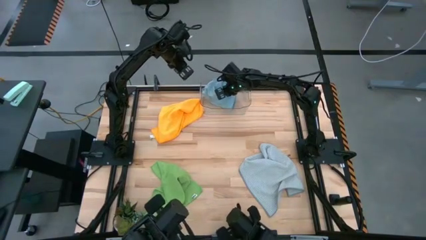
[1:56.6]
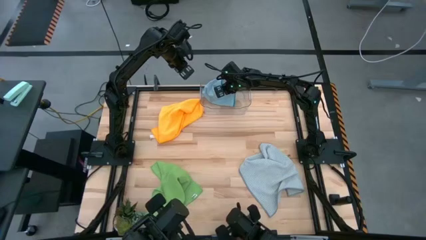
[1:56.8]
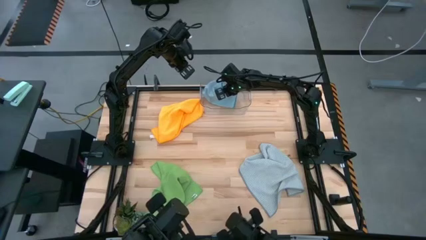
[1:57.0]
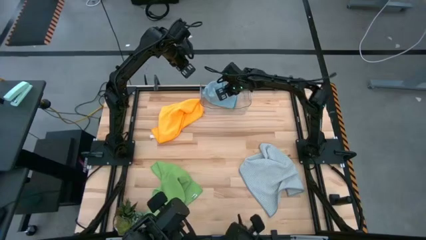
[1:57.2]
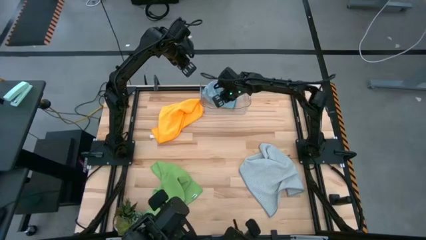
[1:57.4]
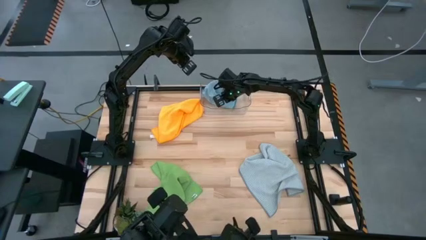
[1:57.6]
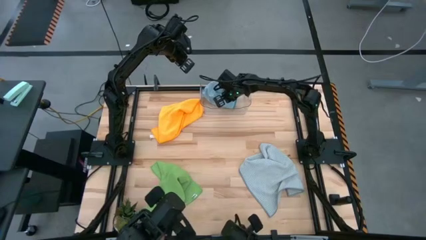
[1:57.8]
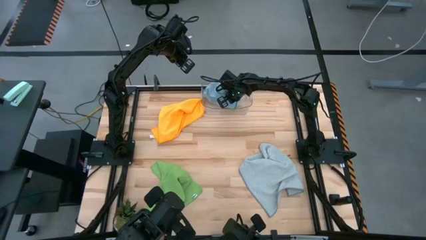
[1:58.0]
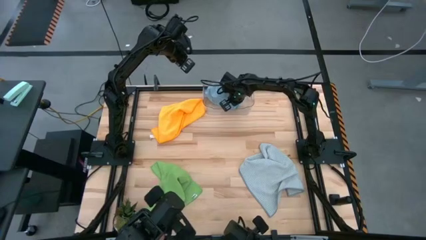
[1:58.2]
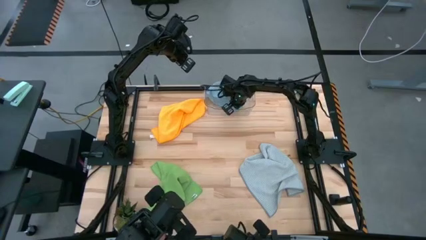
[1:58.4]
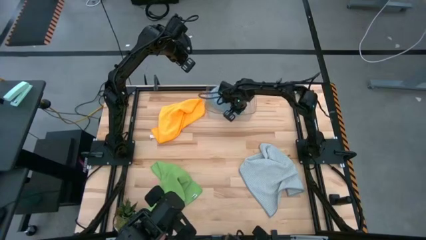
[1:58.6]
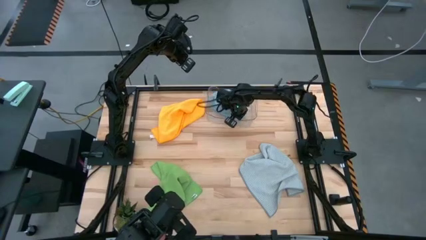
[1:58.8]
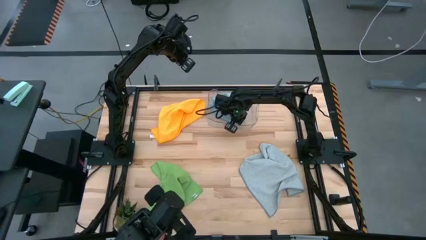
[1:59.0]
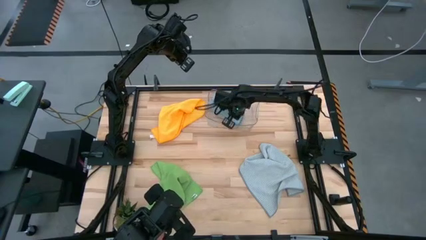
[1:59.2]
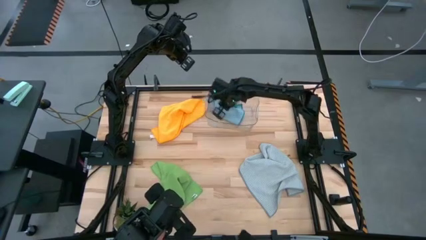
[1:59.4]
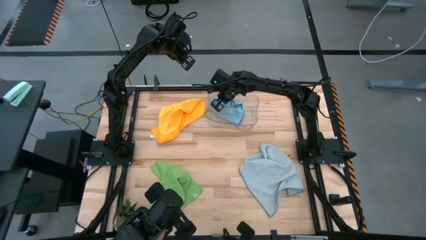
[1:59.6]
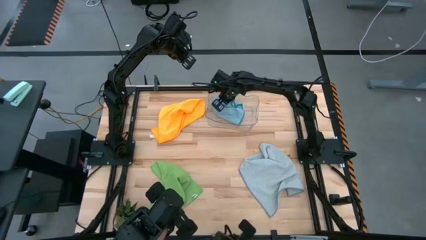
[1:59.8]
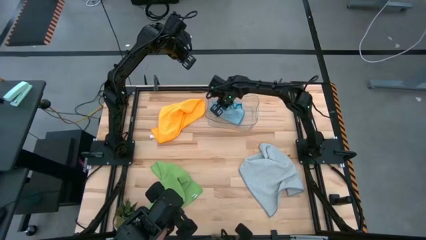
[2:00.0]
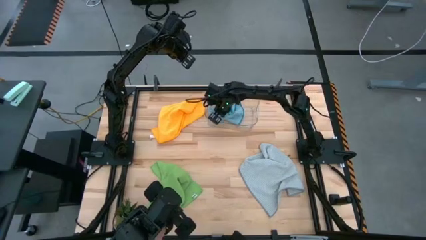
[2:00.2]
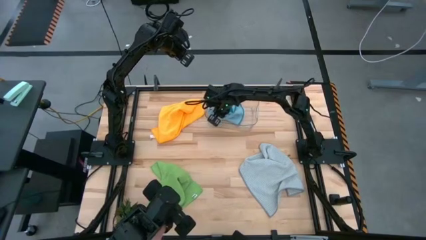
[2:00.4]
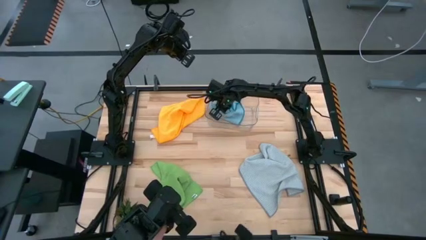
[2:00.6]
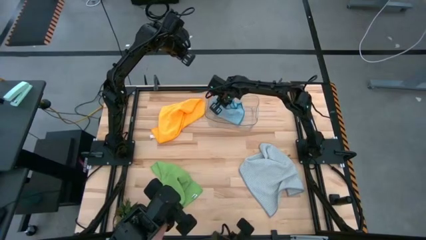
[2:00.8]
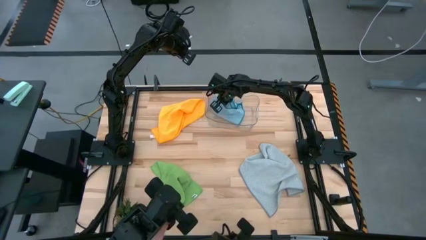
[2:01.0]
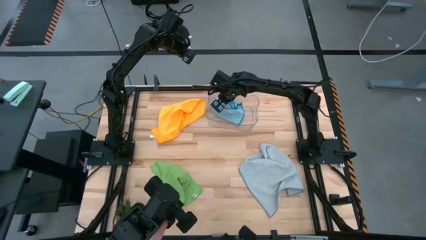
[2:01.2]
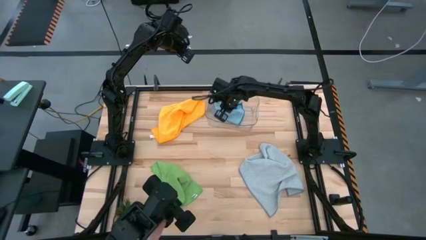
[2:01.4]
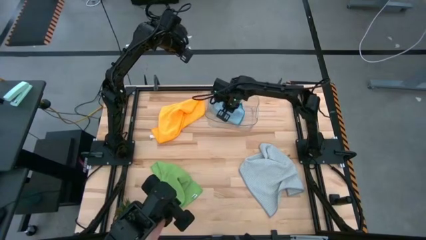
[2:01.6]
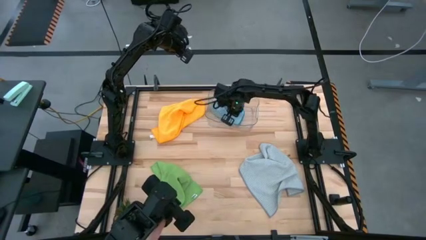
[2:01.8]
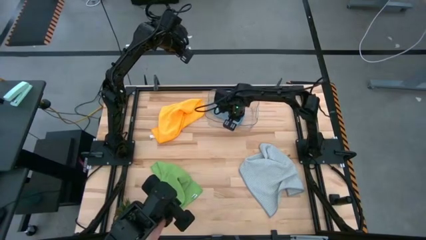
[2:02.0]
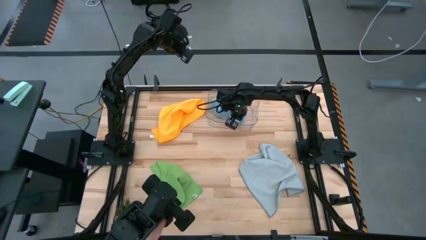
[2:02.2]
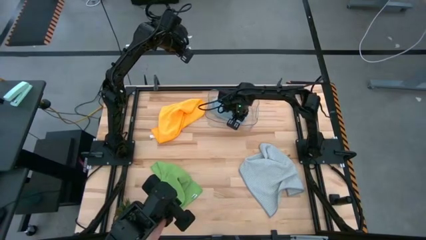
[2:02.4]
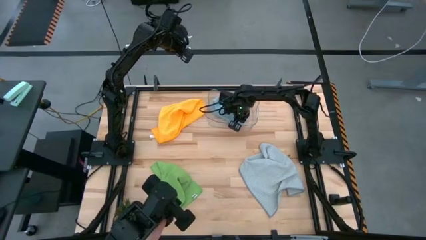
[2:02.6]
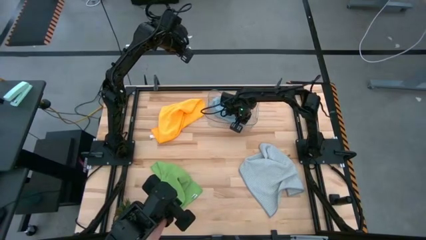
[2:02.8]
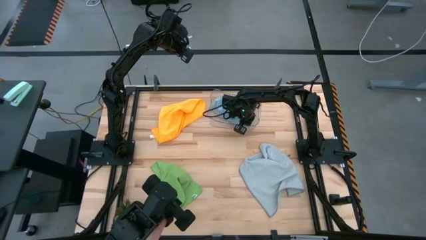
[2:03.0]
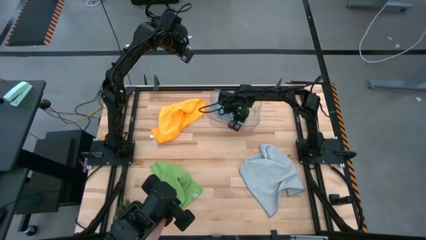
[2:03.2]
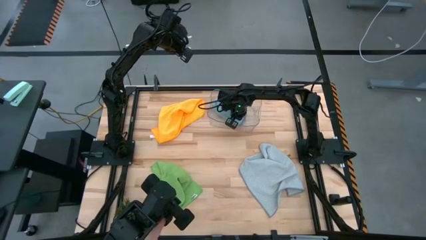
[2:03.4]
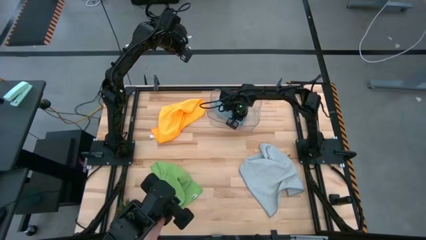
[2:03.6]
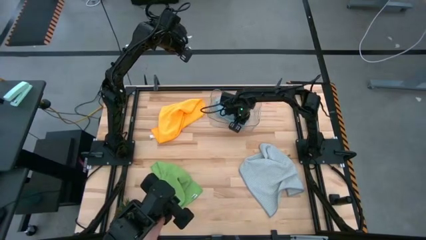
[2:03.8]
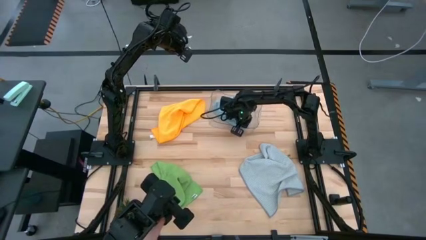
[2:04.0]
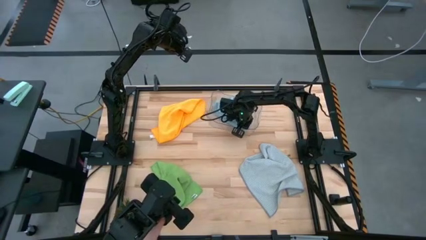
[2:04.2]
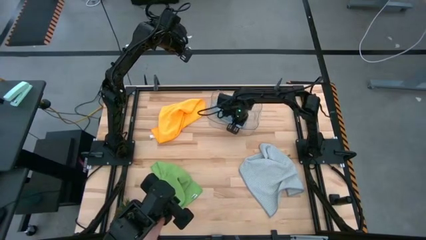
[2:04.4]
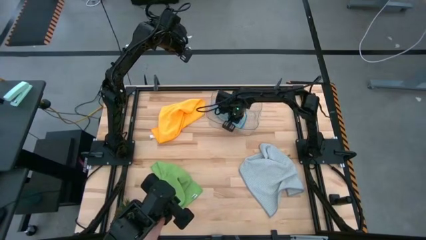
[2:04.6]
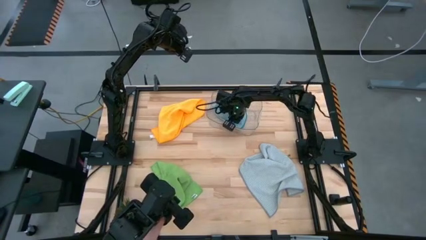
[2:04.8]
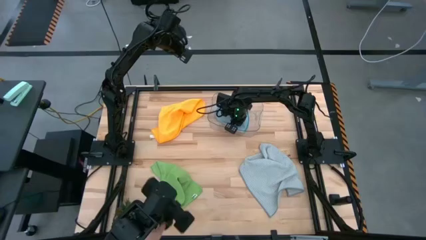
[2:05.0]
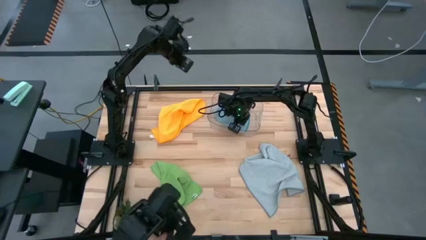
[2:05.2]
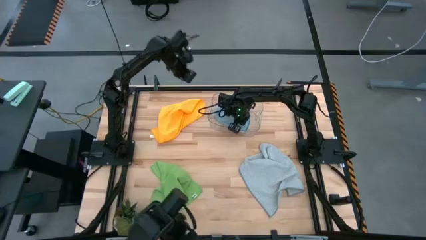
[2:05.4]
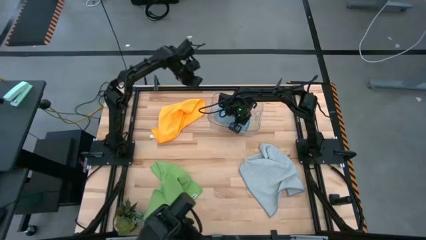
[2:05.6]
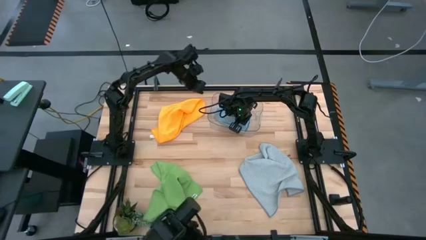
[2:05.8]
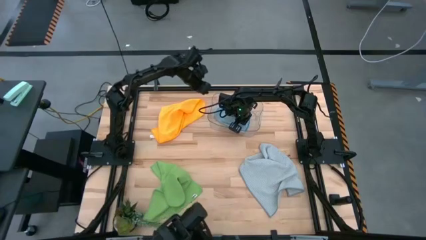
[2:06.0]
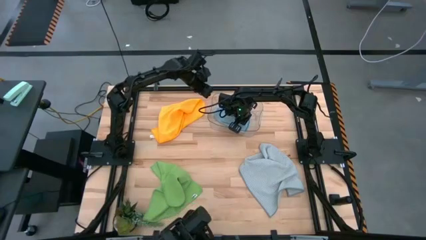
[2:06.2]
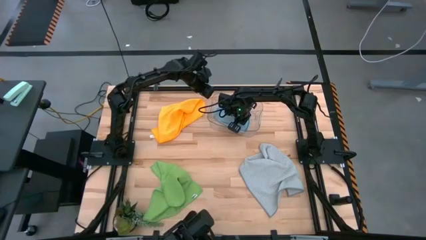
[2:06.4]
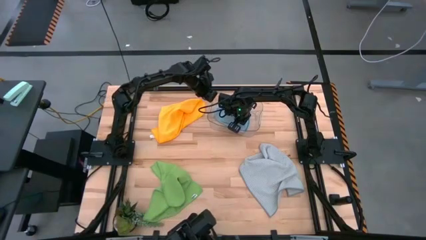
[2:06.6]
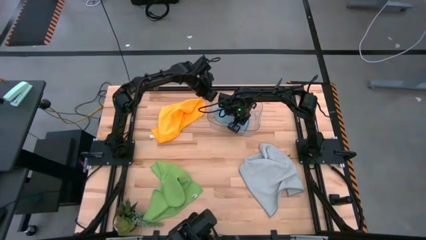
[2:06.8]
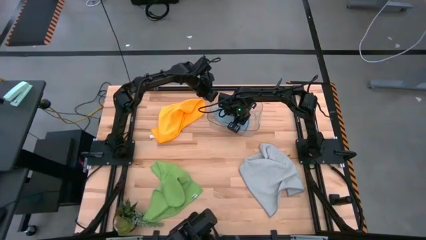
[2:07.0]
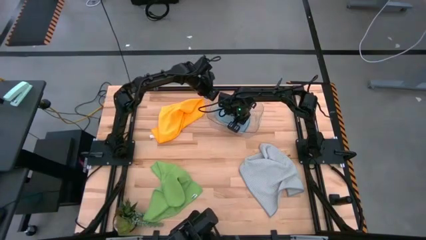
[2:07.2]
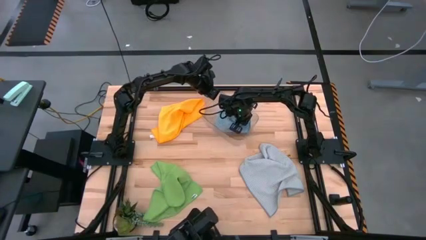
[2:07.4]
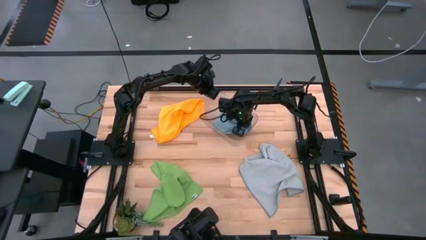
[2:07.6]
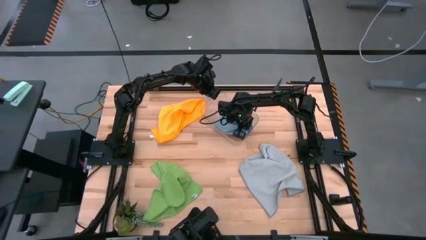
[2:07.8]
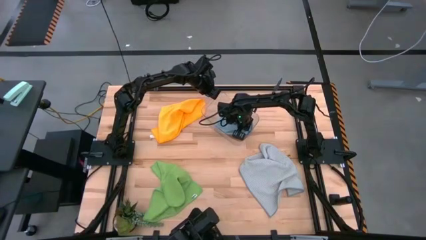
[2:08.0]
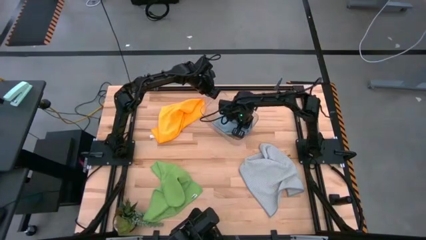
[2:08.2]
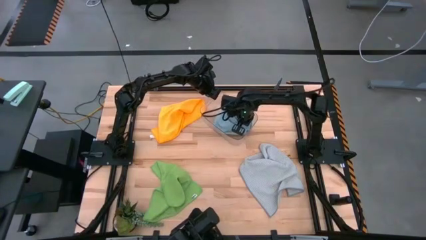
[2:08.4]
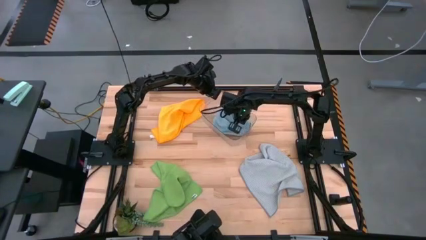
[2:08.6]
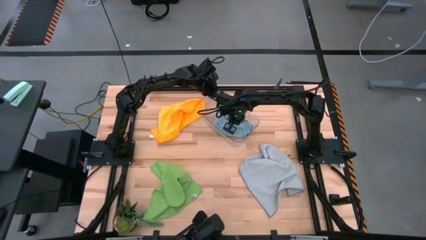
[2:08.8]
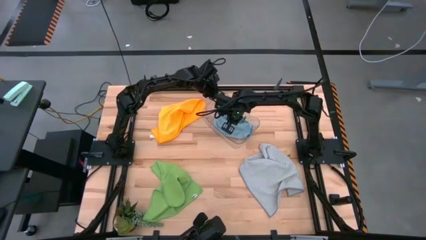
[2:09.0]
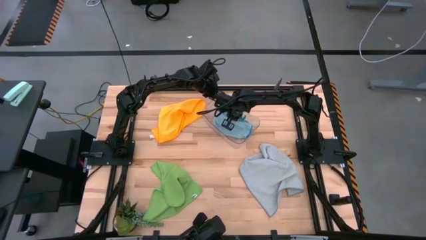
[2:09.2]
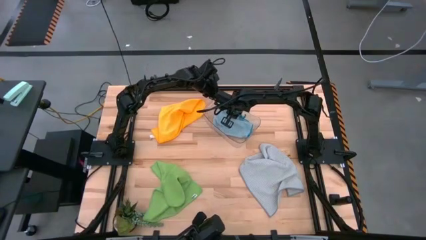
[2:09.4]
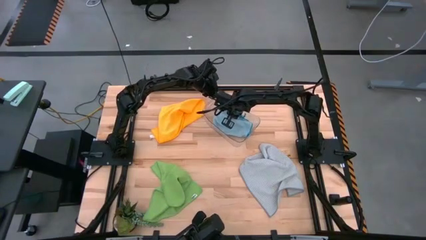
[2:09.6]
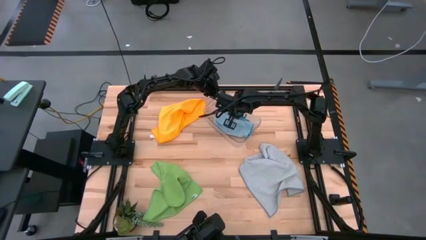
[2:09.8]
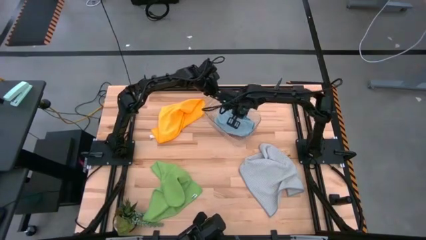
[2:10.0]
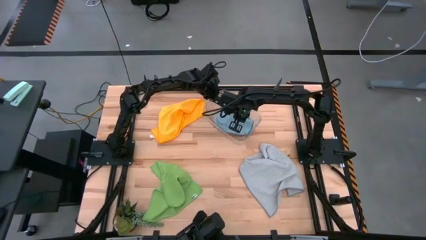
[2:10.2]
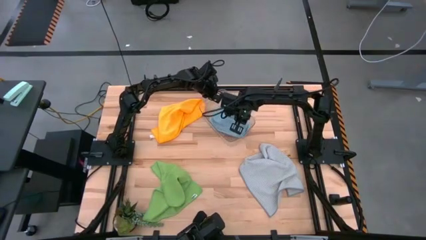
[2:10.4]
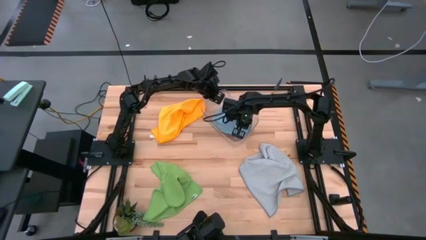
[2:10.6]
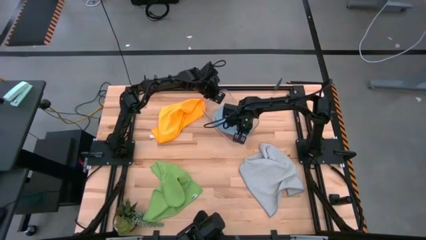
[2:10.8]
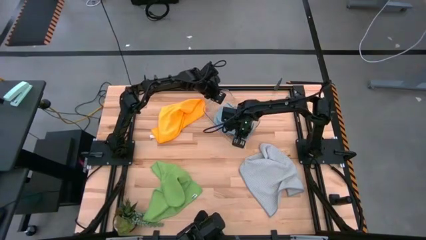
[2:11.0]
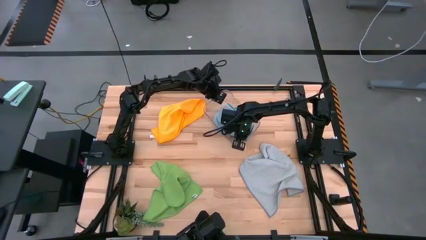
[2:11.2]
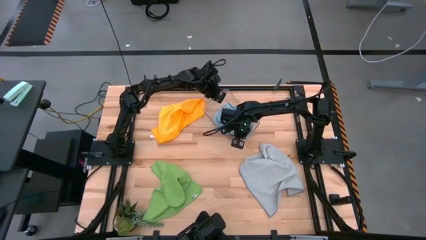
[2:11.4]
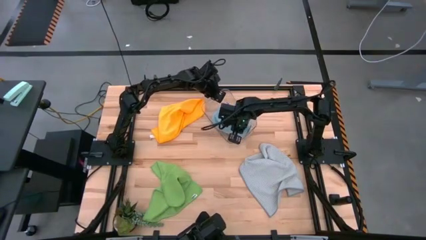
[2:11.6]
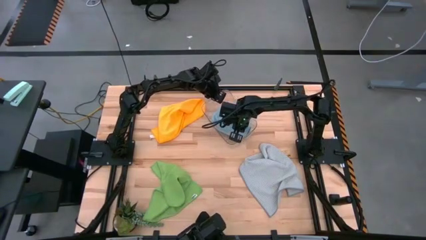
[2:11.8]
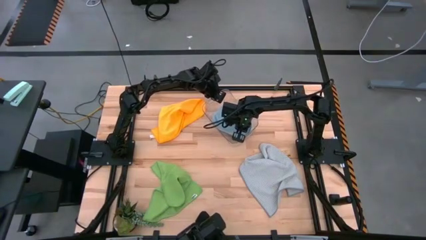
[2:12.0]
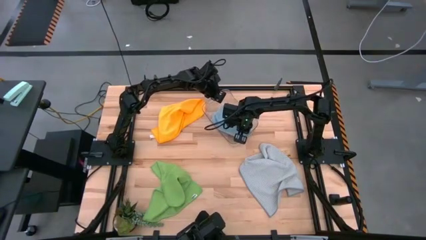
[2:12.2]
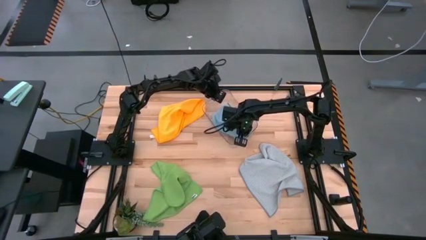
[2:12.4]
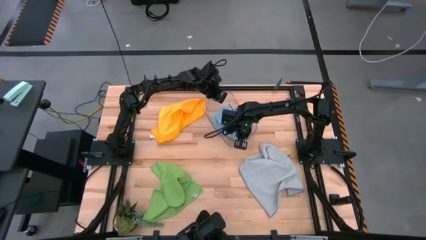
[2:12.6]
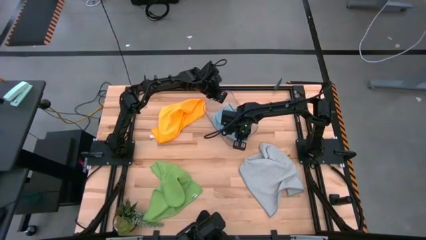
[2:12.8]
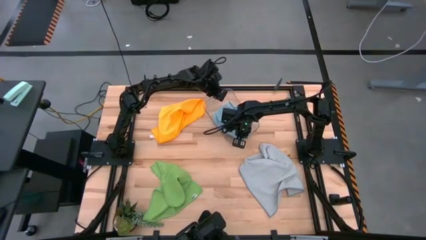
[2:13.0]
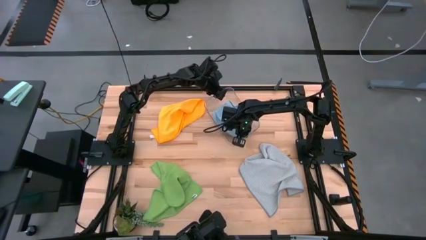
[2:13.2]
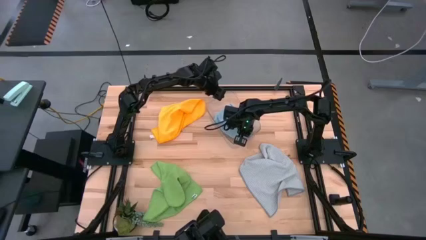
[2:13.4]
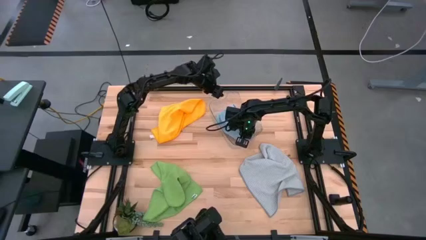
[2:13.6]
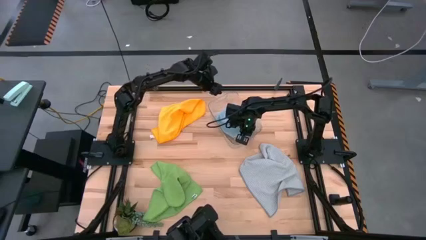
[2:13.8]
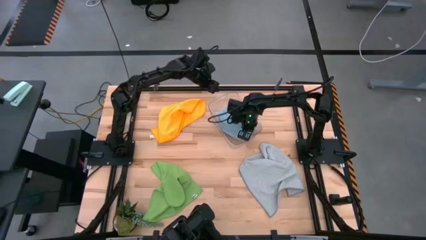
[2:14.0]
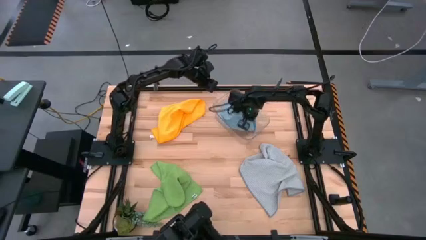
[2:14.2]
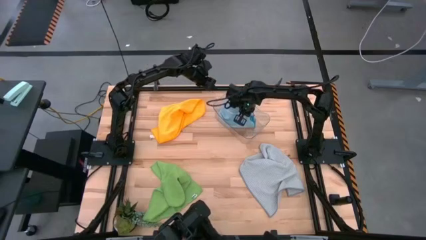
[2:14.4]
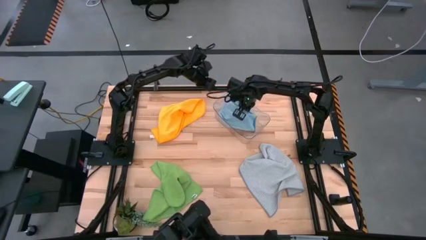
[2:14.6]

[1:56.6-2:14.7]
Task: Fold microfiber towels
Put the blue microfiber cloth into the transparent bin
